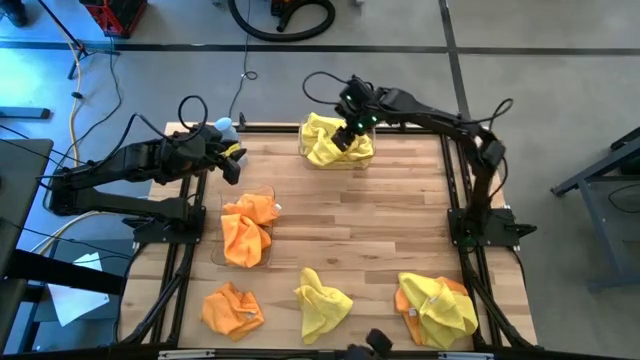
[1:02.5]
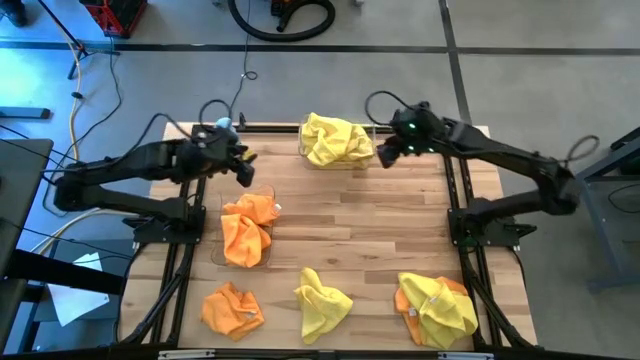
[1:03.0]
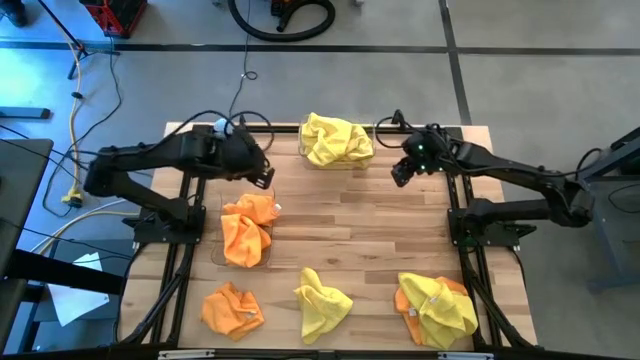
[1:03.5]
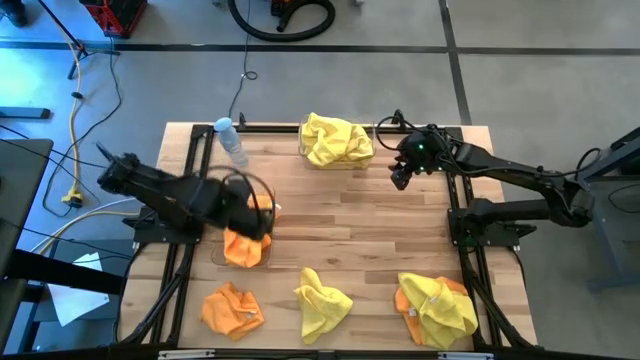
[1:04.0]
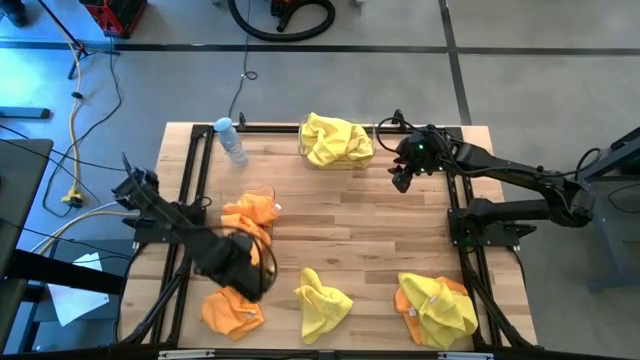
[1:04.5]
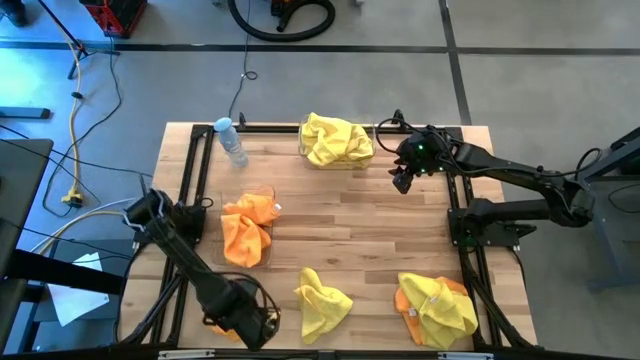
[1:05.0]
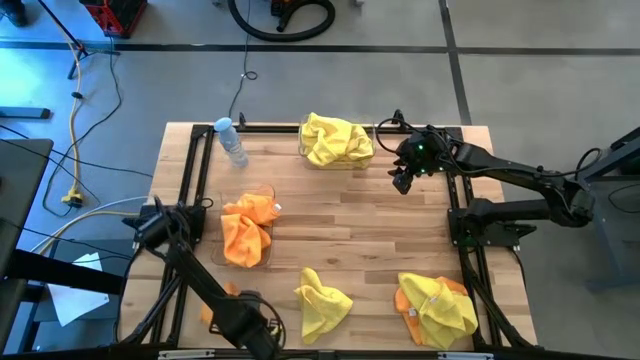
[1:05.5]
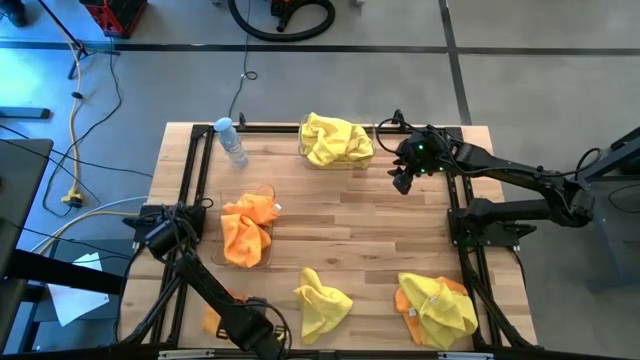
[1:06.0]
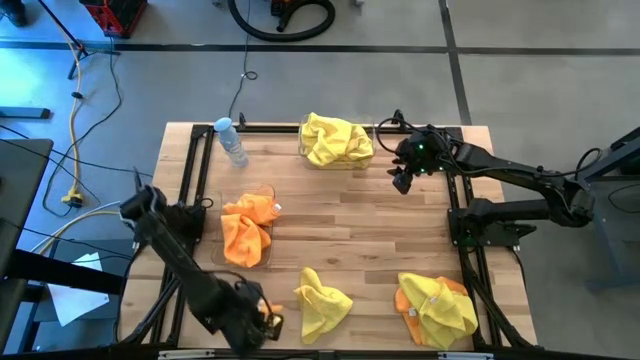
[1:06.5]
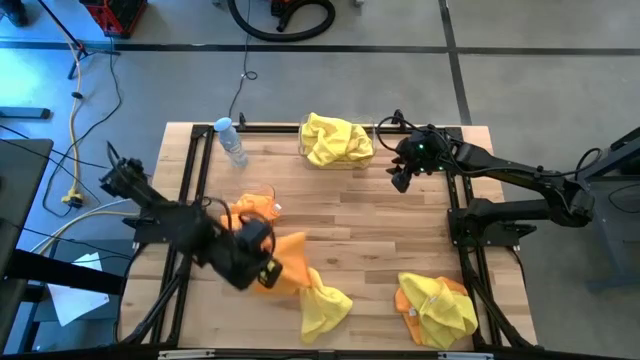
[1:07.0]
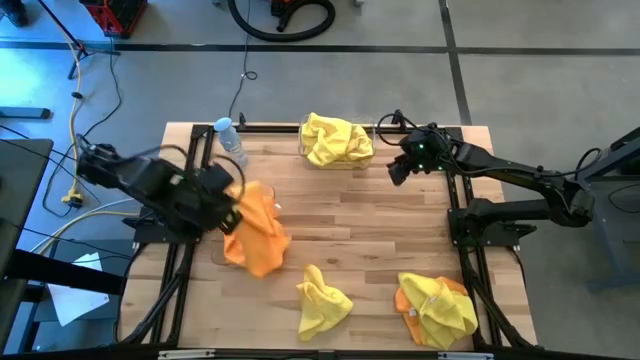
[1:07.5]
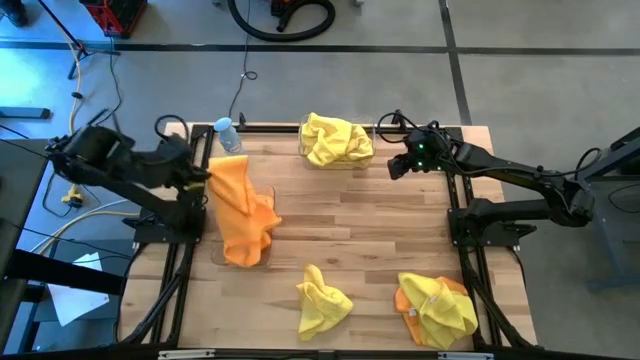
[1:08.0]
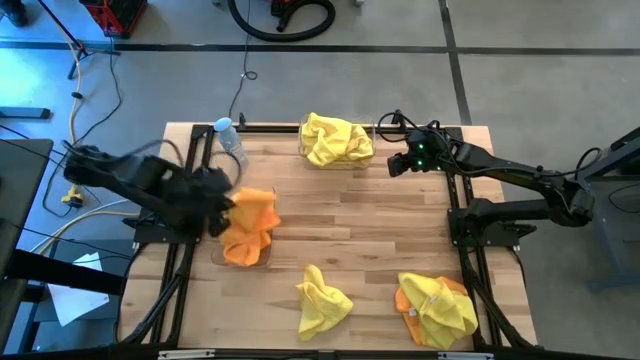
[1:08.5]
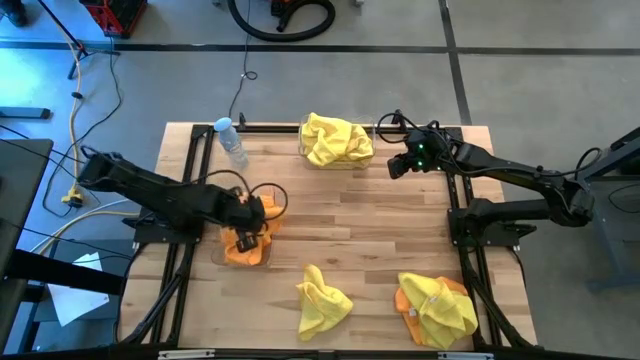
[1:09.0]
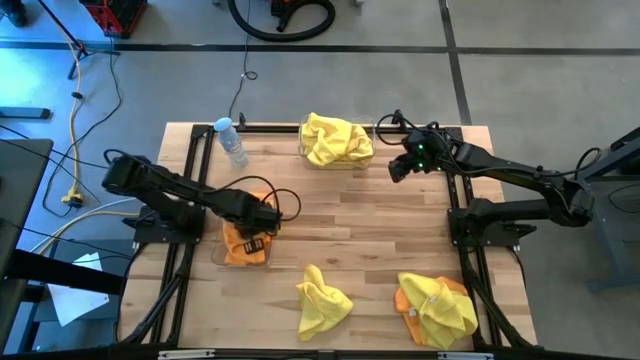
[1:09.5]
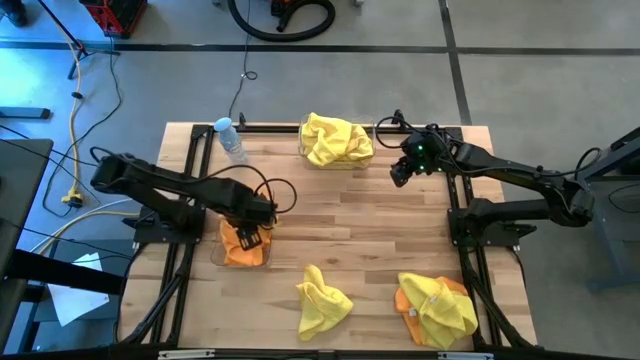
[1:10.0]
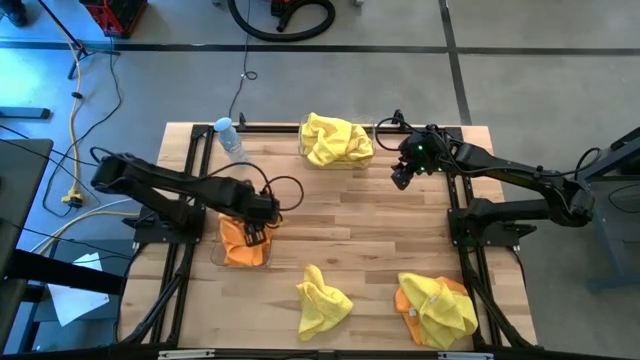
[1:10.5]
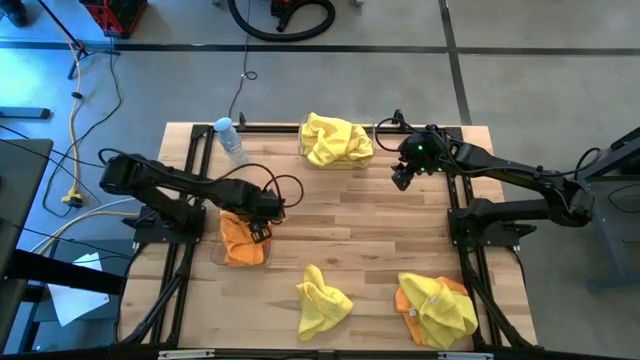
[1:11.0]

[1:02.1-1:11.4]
Task: Sort microfiber towel by color & place in baskets
Put the orange microfiber towel into the bottom transparent bin

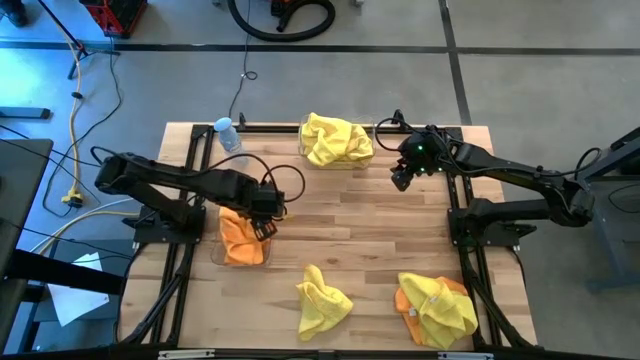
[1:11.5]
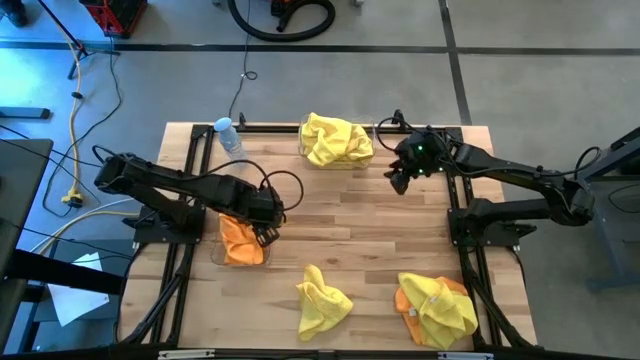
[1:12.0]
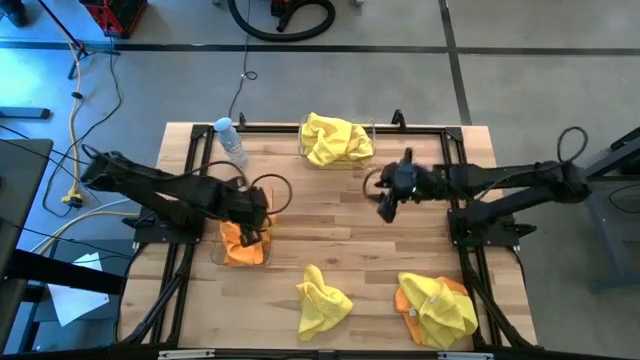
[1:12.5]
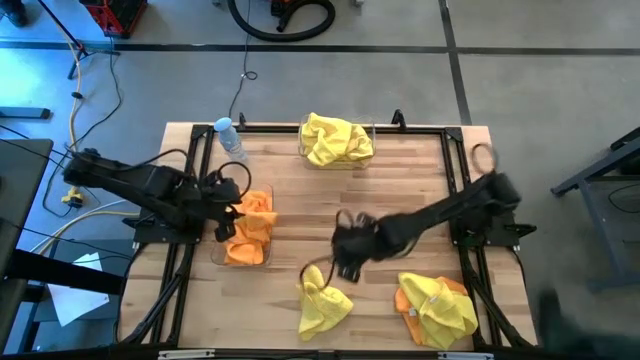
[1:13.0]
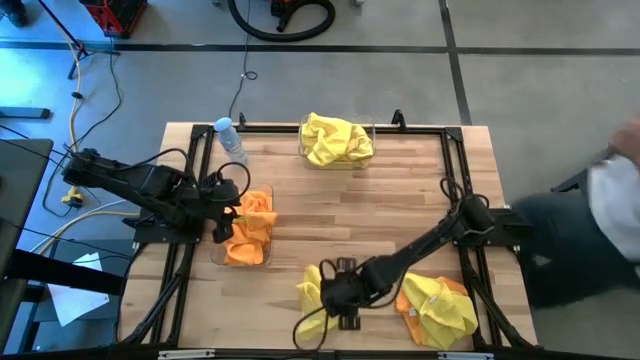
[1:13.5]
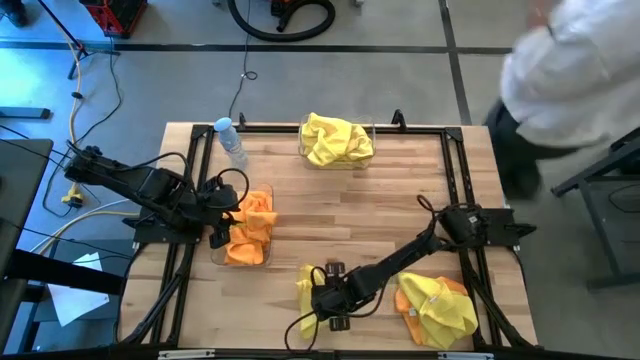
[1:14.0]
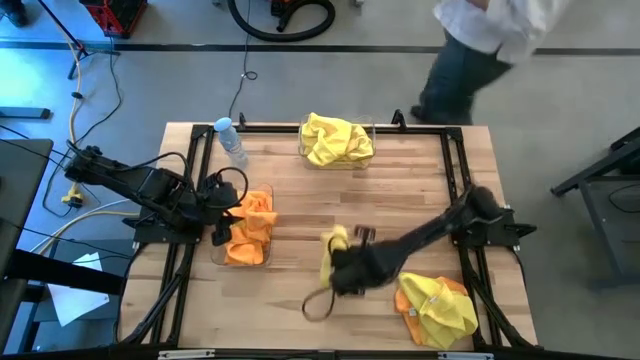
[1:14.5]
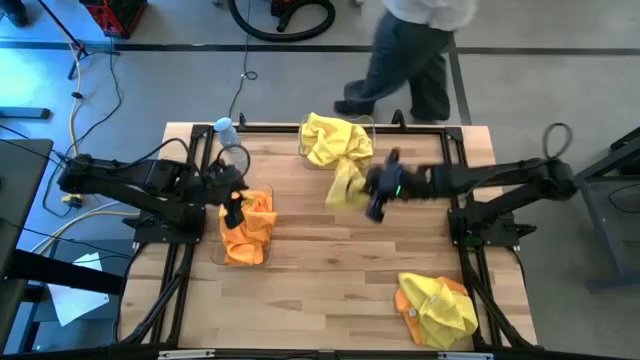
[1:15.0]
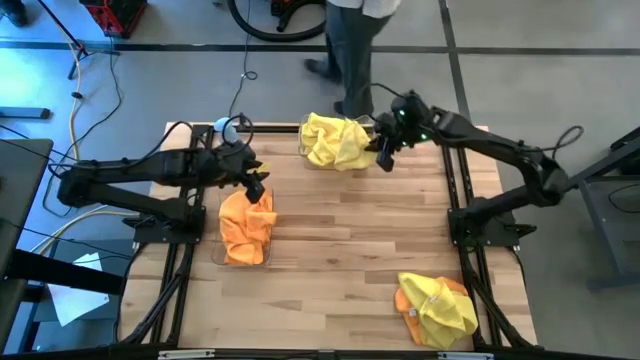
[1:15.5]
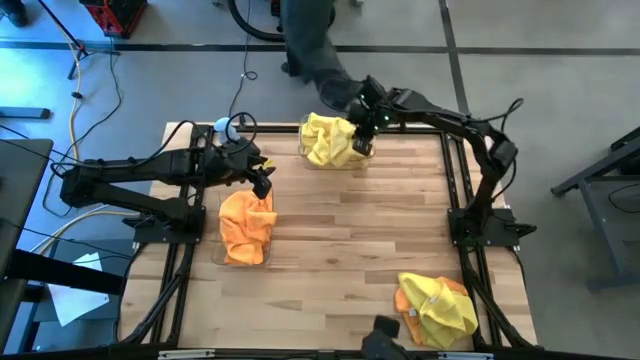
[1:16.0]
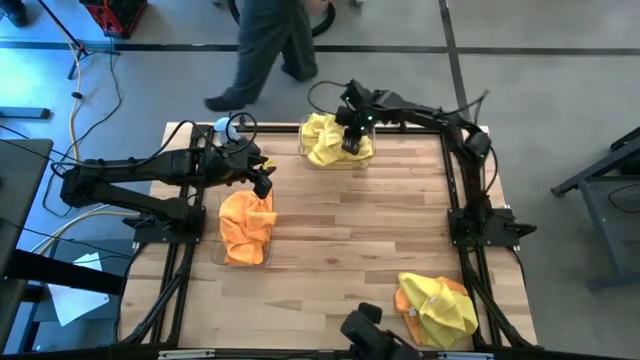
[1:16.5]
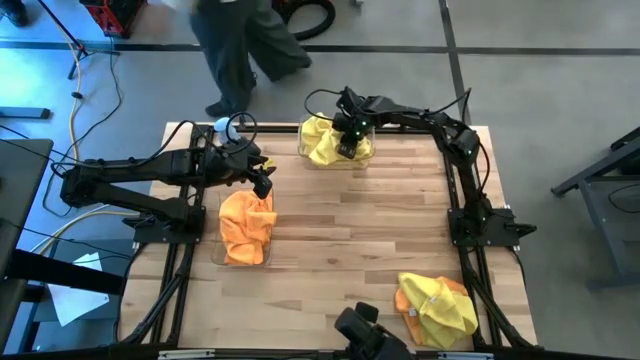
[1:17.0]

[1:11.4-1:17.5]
Put the yellow microfiber towel into the top transparent bin

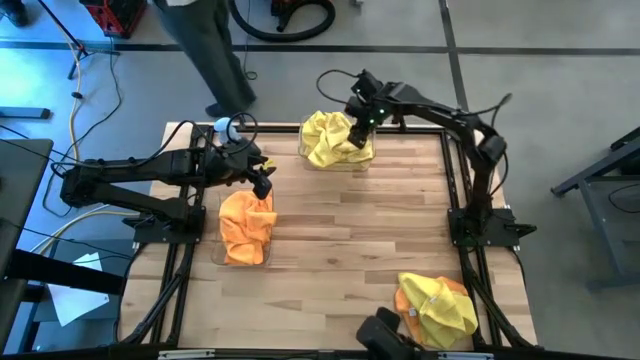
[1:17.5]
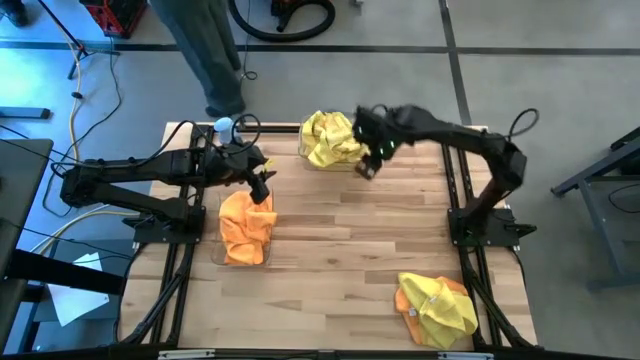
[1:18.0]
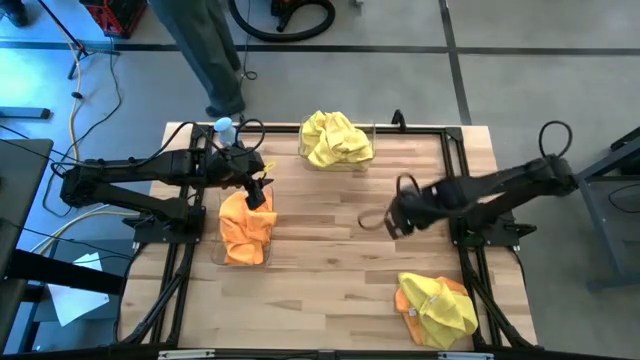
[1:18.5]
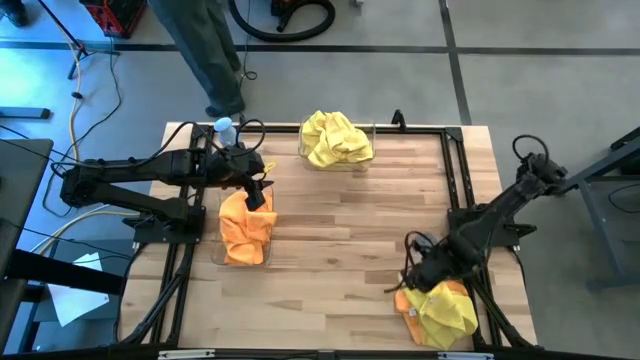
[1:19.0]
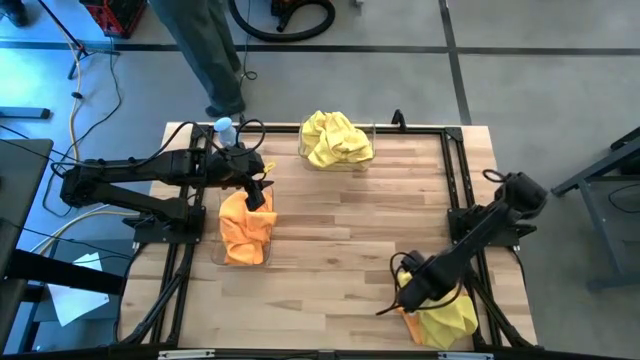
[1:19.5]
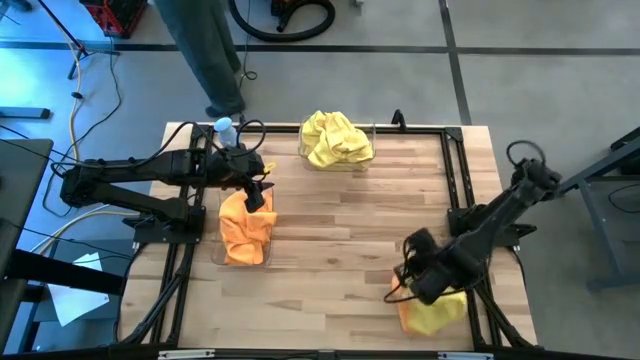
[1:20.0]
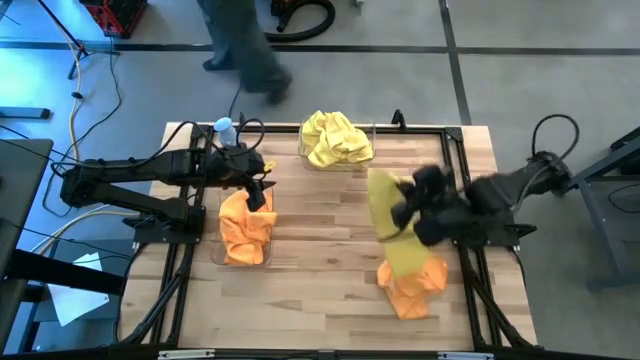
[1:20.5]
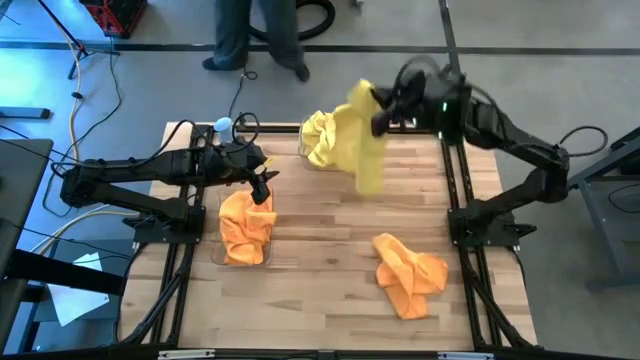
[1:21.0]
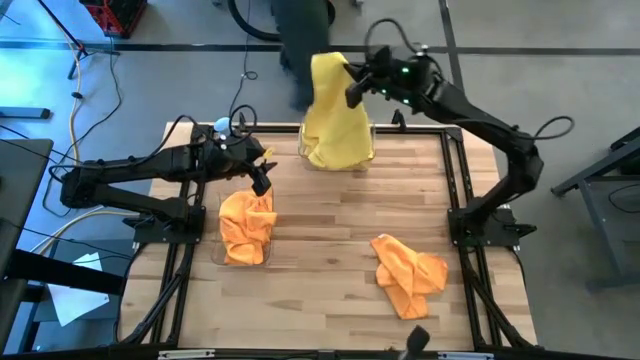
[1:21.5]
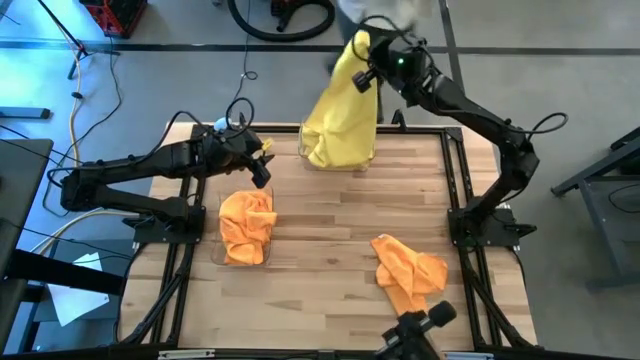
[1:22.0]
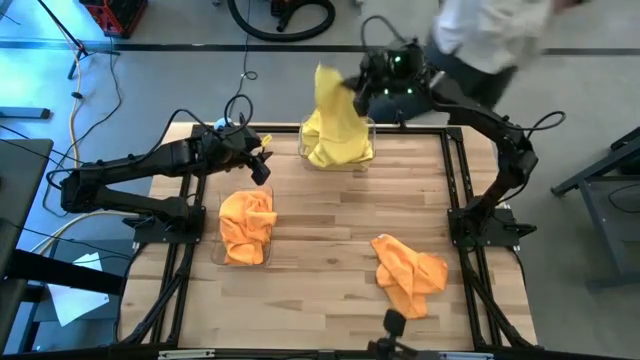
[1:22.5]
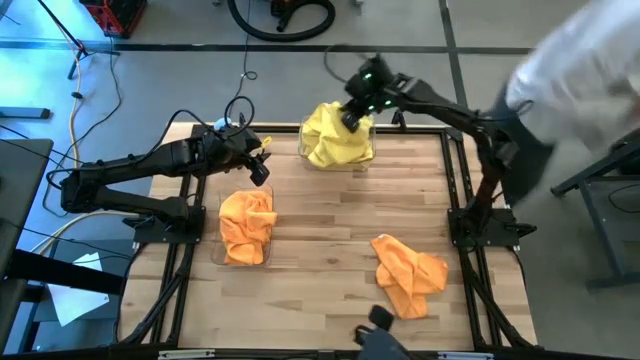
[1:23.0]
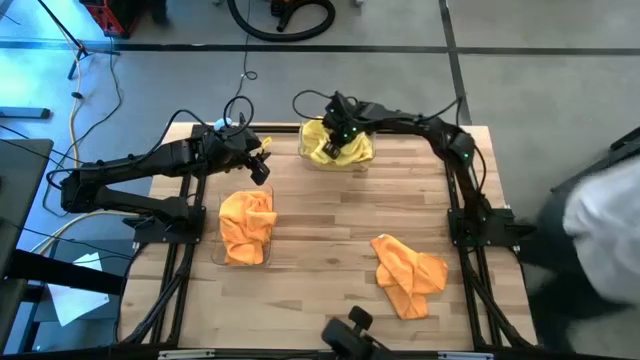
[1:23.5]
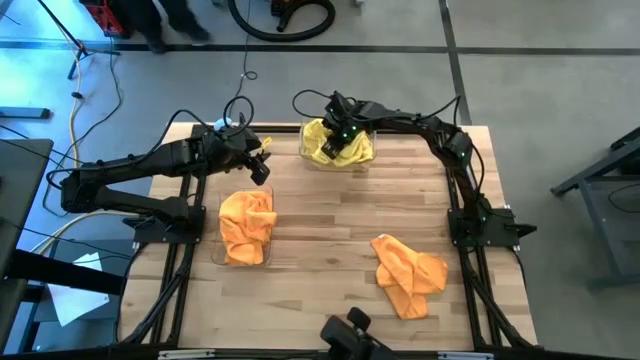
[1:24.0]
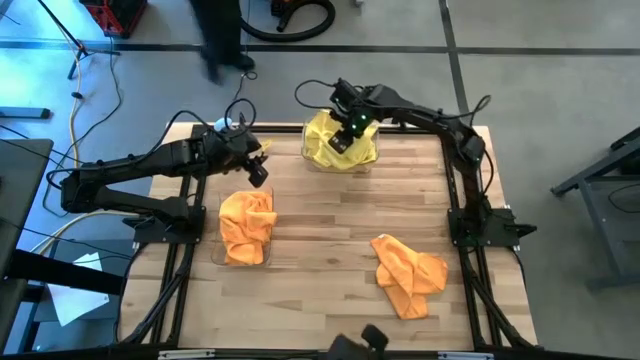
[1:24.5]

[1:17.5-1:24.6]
Put the yellow microfiber towel into the top transparent bin
